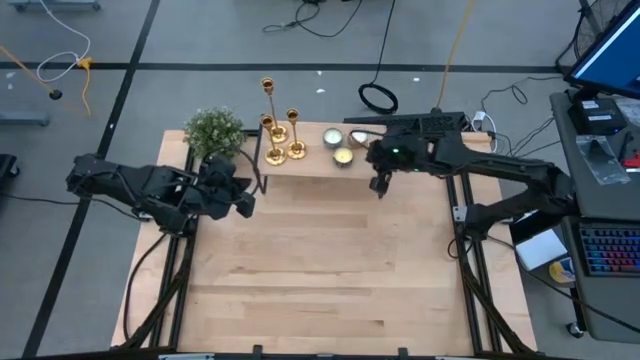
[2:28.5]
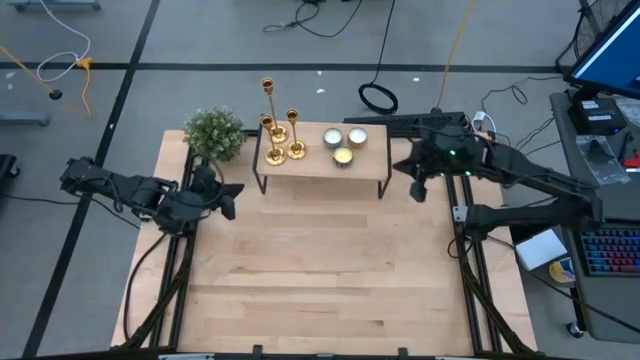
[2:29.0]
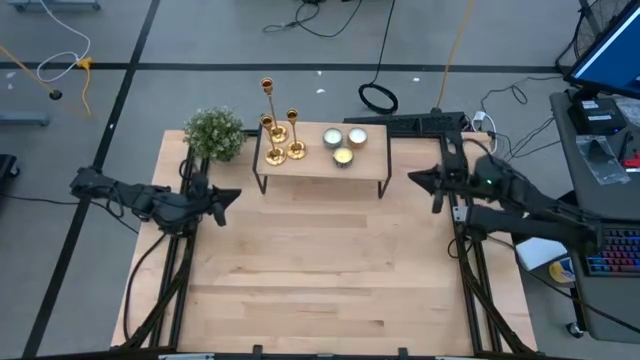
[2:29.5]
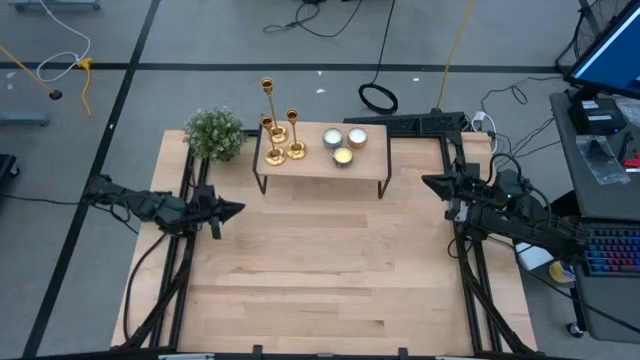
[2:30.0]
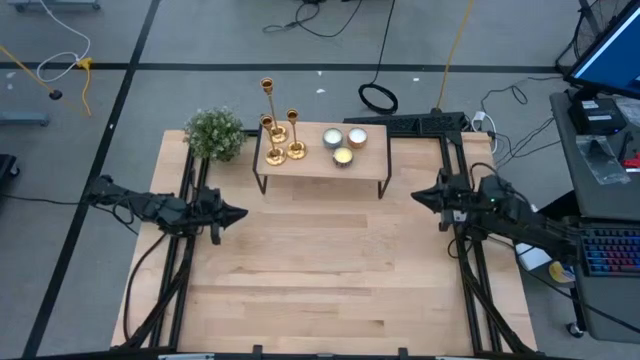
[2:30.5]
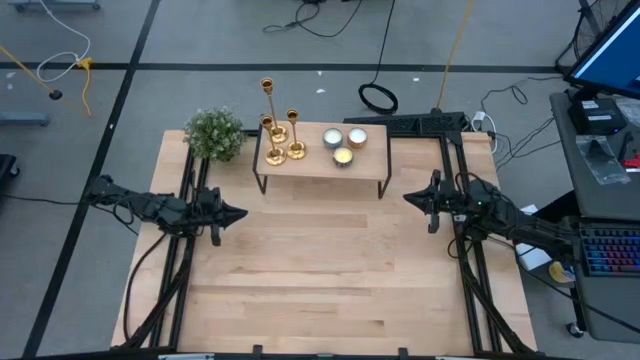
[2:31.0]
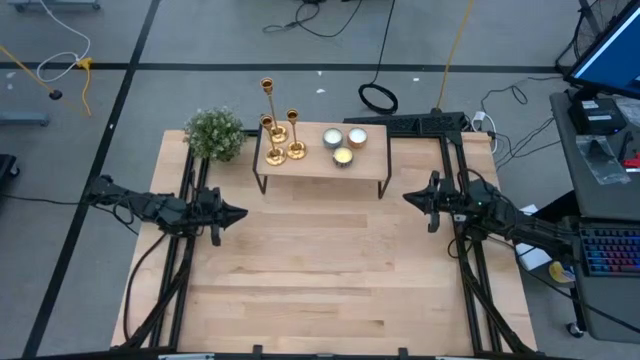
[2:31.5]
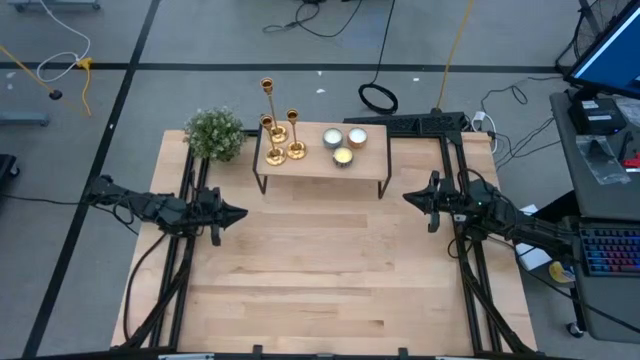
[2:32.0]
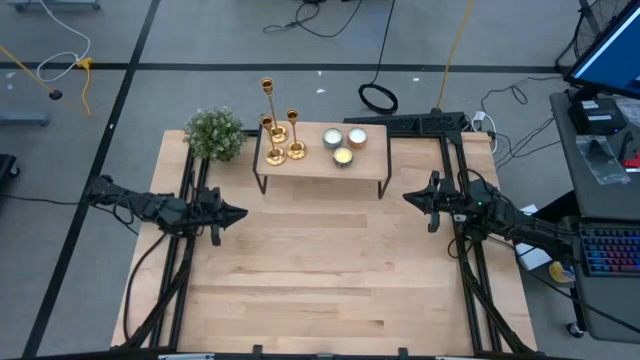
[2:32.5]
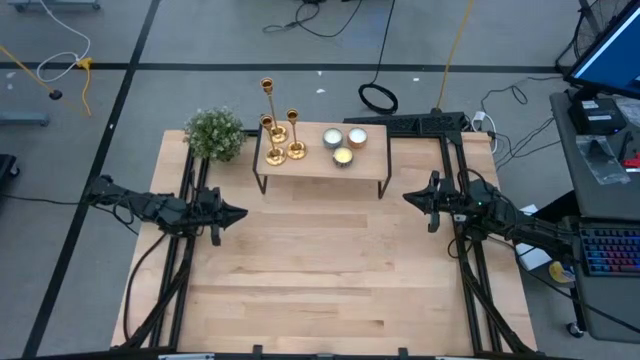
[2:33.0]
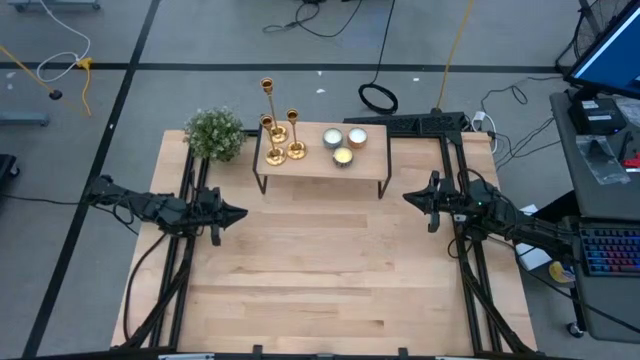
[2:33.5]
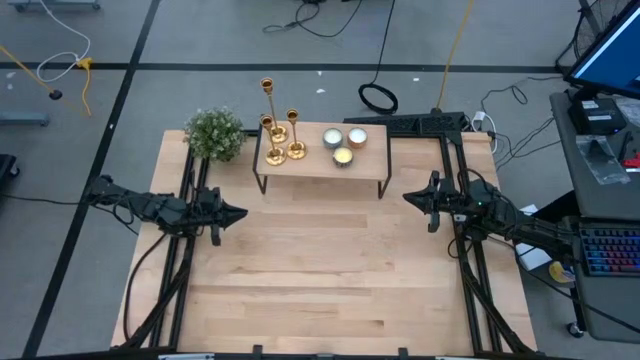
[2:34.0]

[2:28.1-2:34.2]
Task: Pick & Place candle stick holders
Return to Home Position

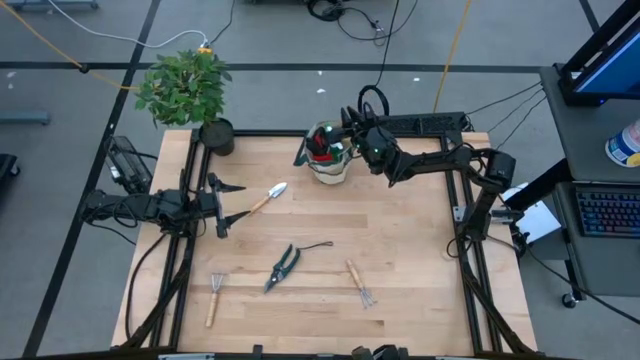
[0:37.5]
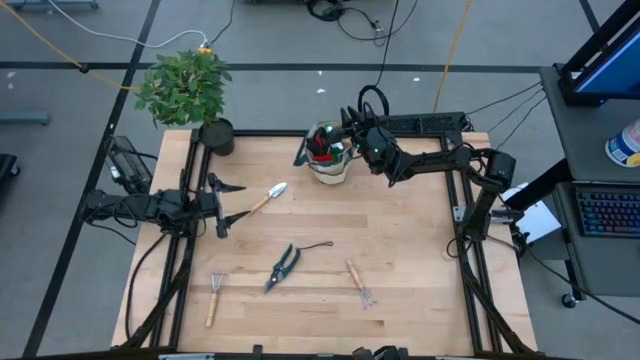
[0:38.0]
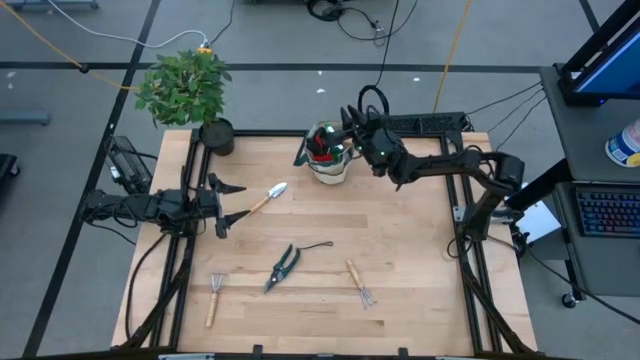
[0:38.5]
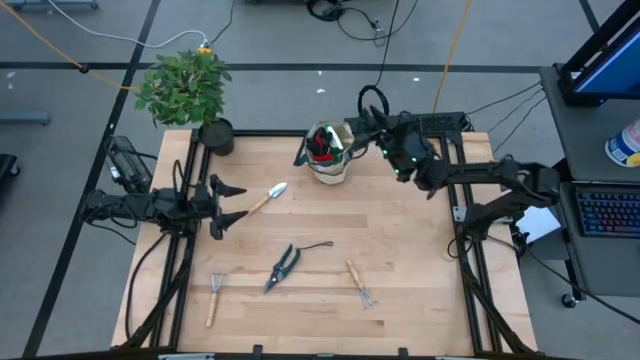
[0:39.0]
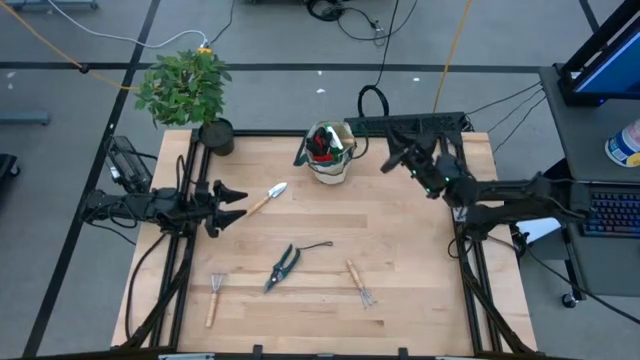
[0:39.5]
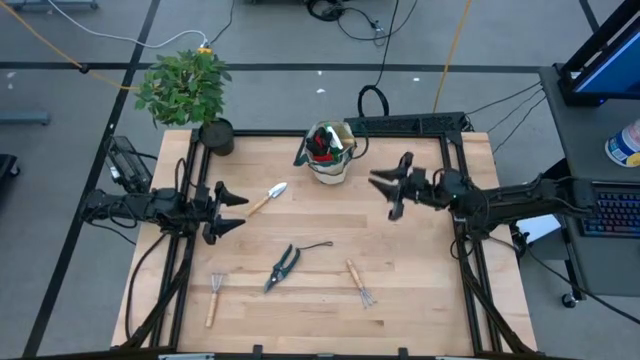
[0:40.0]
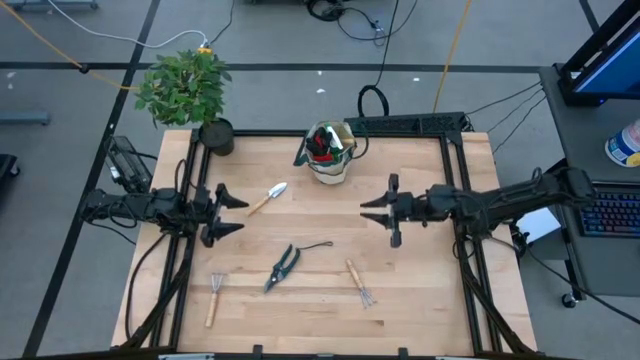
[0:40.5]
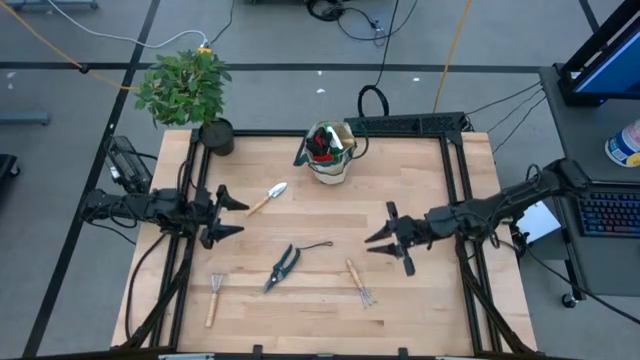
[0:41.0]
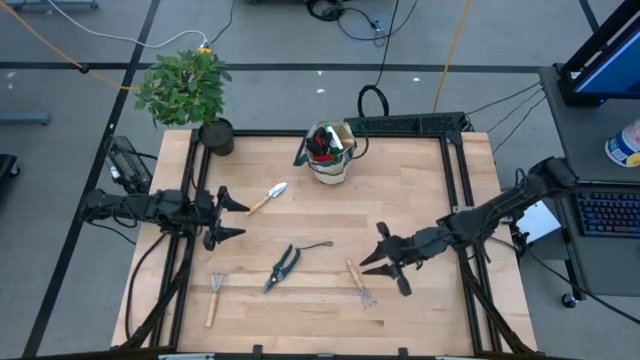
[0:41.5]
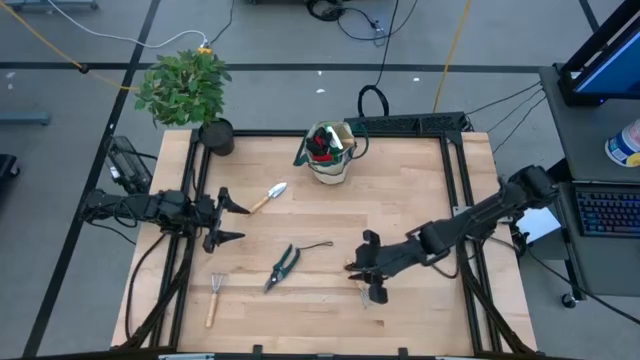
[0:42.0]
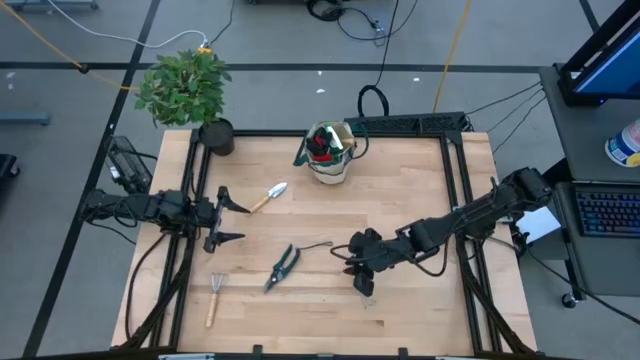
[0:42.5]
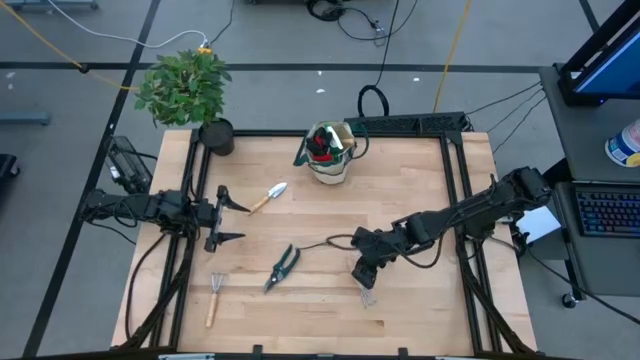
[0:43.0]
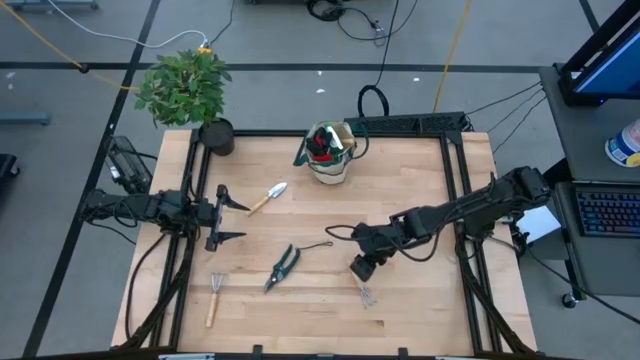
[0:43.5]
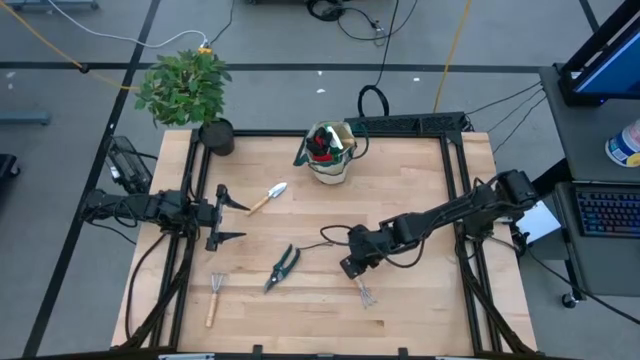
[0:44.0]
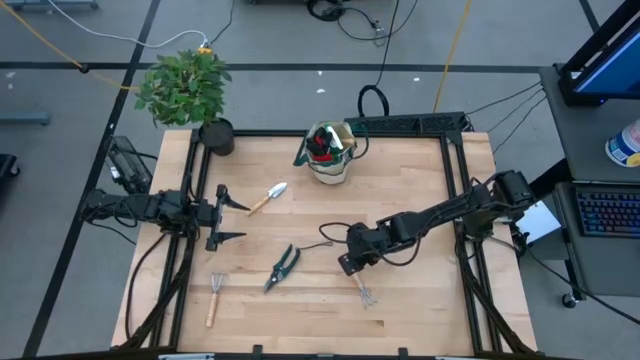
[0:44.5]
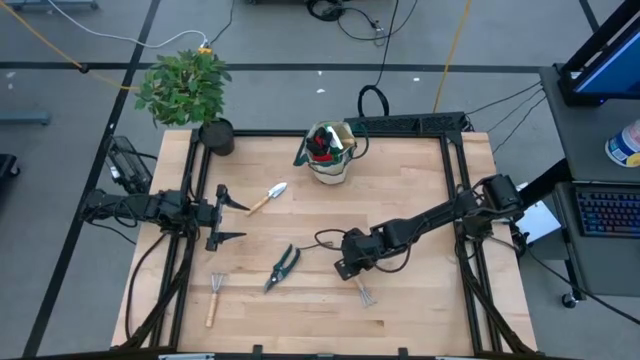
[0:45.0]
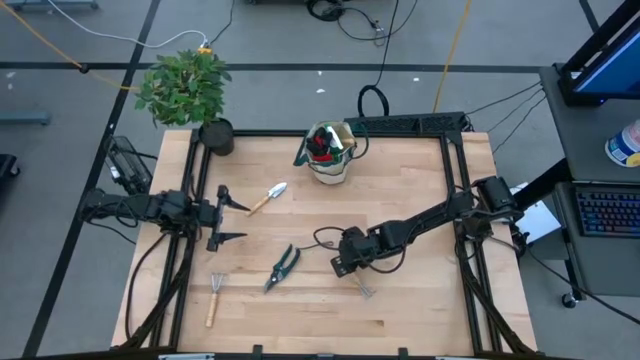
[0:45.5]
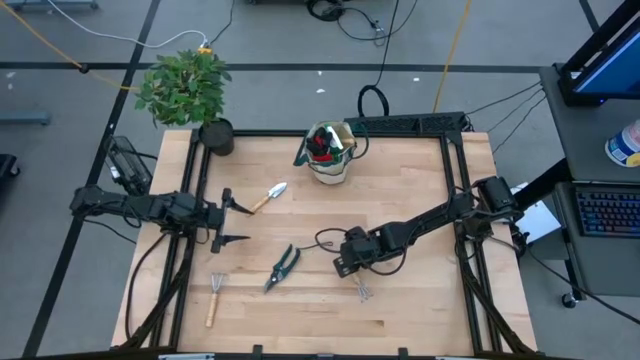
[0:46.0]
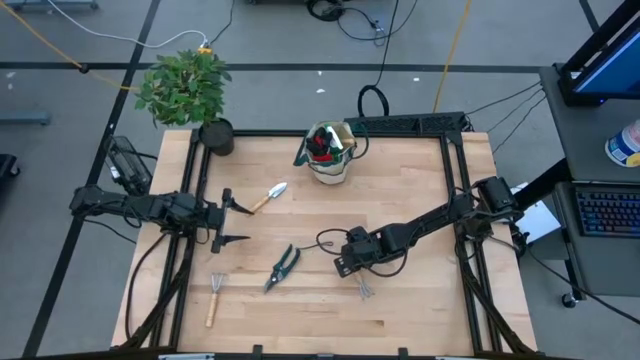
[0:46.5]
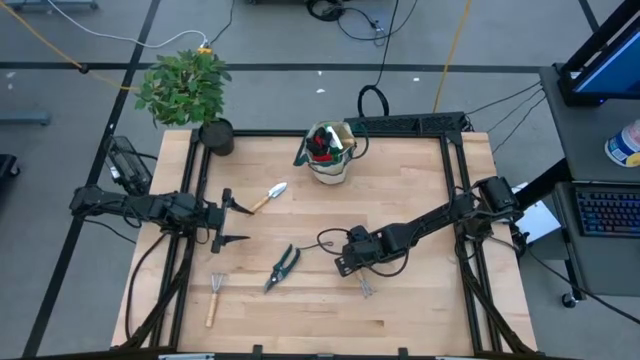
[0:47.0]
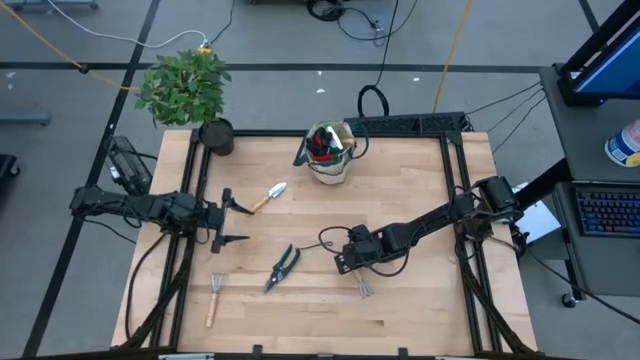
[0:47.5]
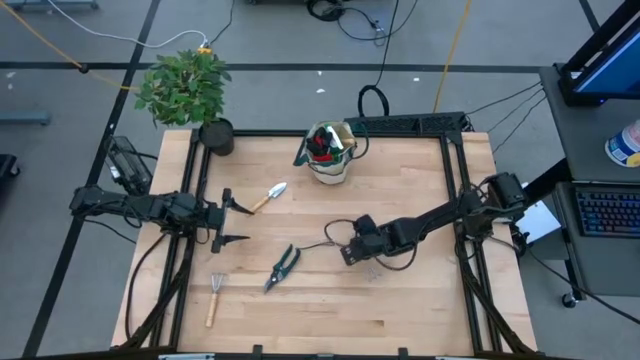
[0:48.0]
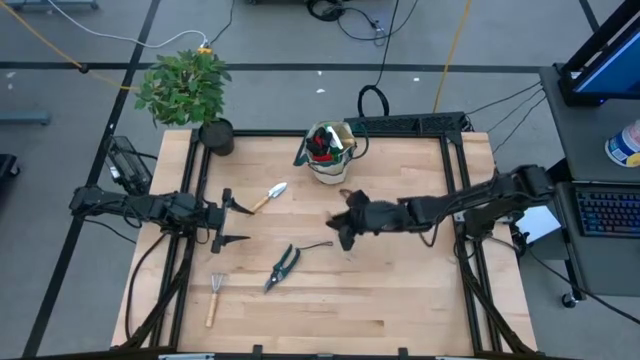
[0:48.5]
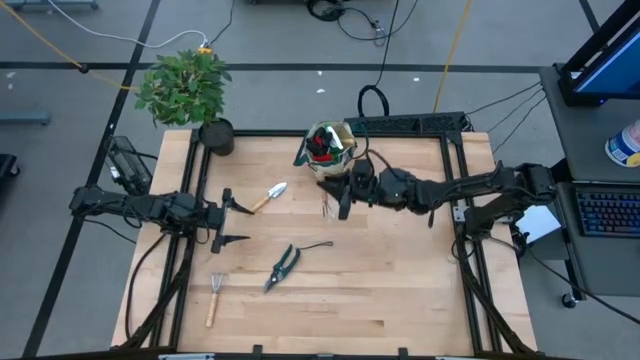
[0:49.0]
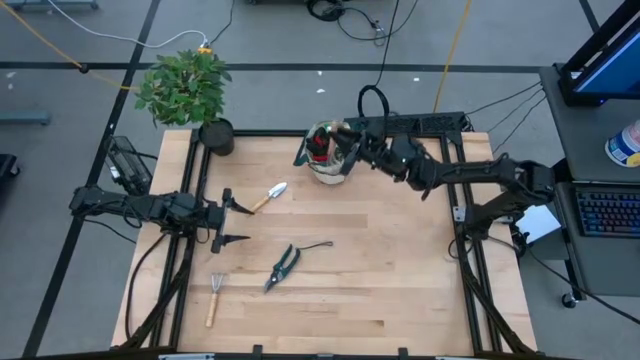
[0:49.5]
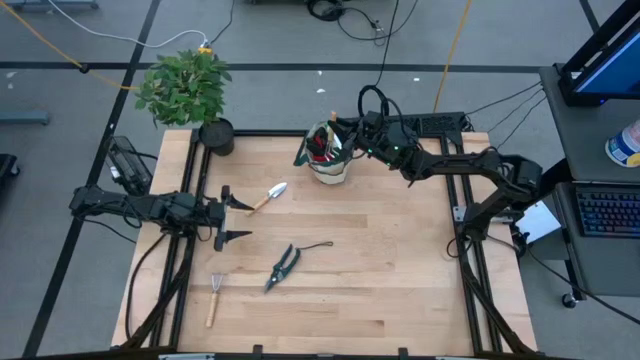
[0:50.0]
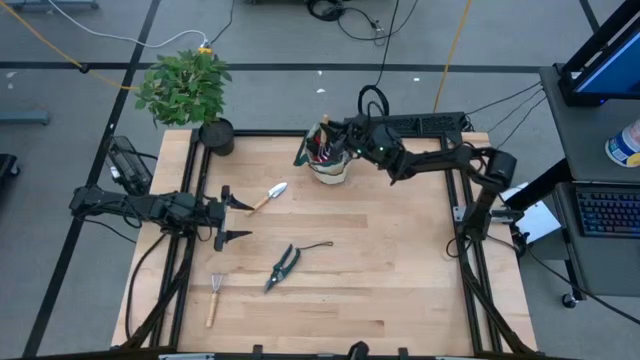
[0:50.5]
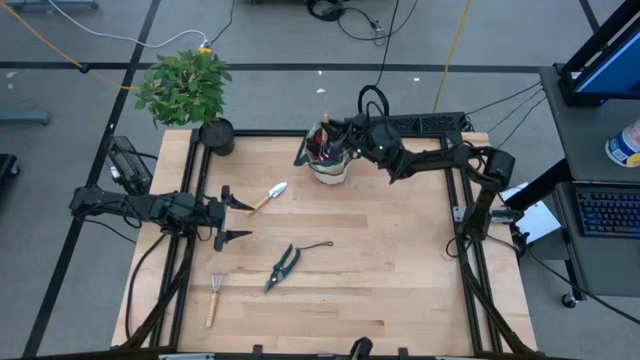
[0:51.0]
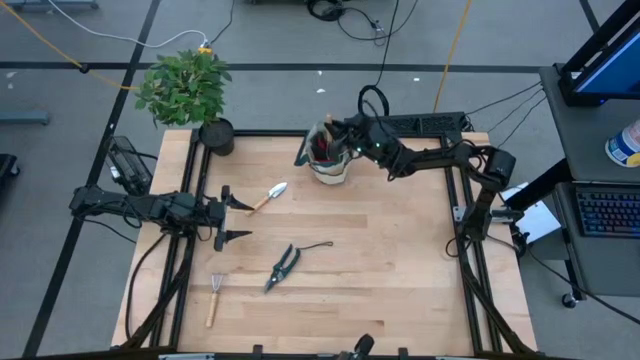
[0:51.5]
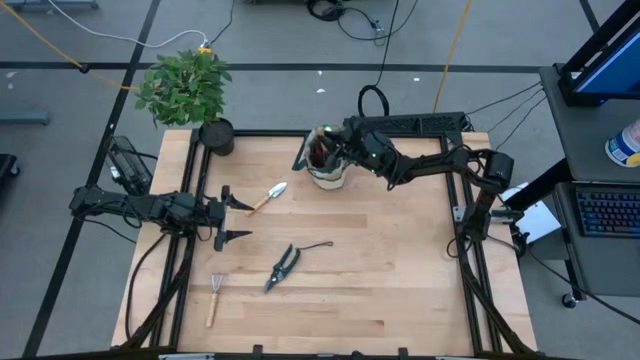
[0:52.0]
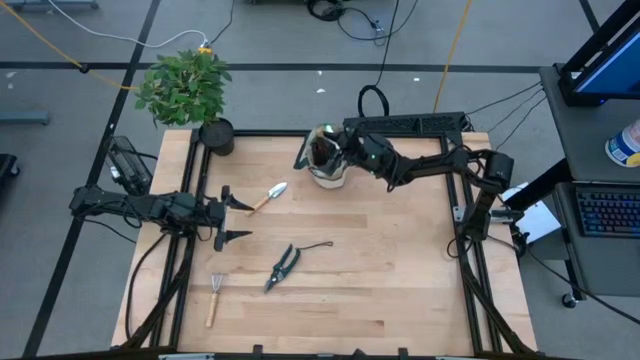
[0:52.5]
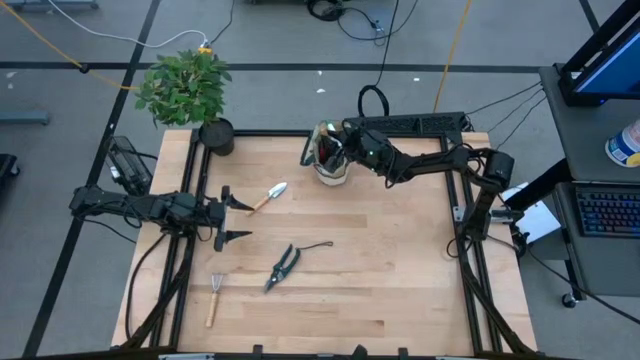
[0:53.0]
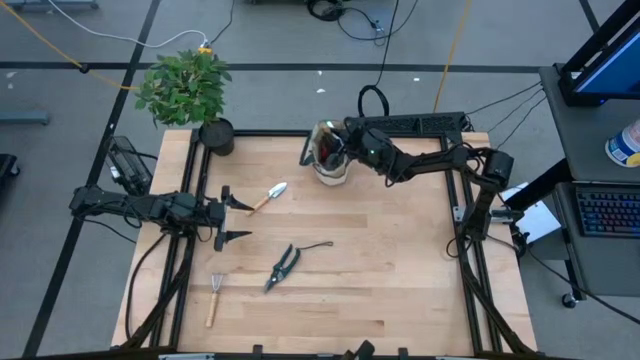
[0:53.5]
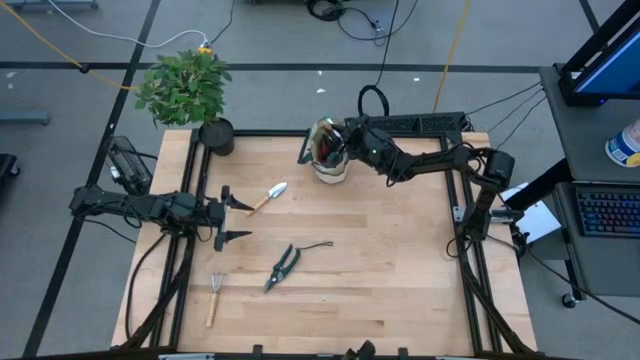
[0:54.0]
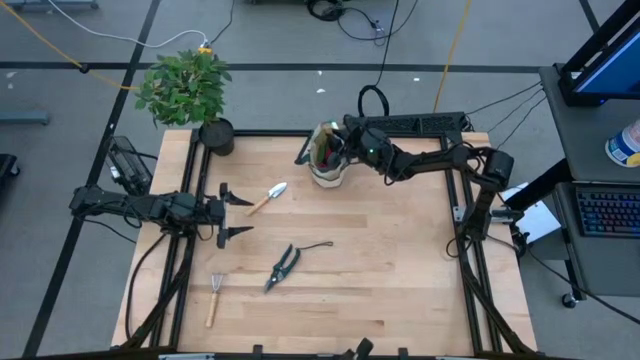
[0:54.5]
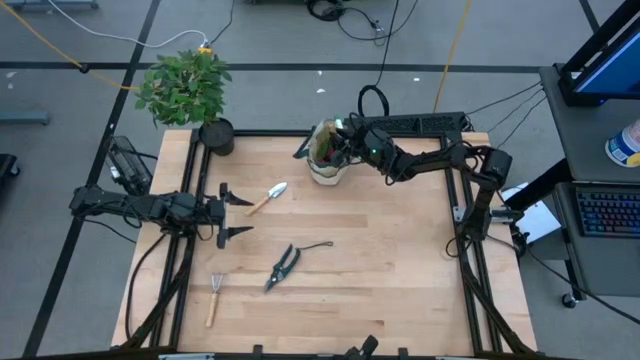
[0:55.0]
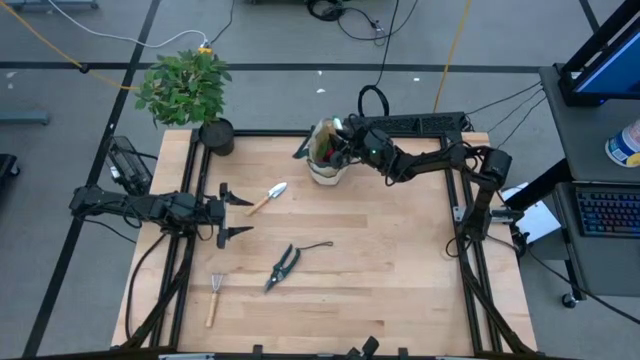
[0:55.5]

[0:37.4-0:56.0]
Task: Pick & Place Garden tools in Gardening bag
Put the right brown hand rake into the brown gardening bag
